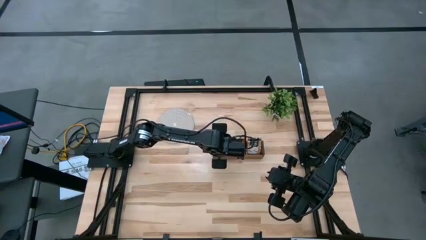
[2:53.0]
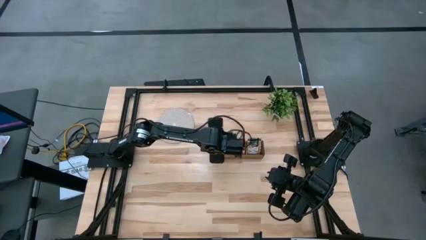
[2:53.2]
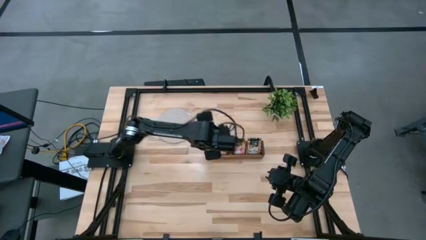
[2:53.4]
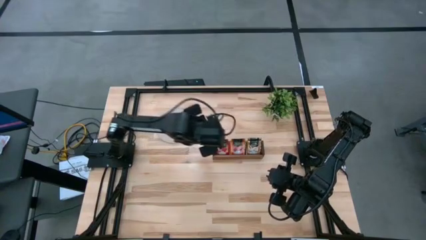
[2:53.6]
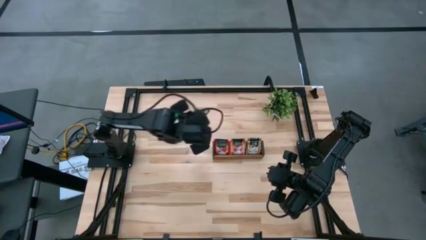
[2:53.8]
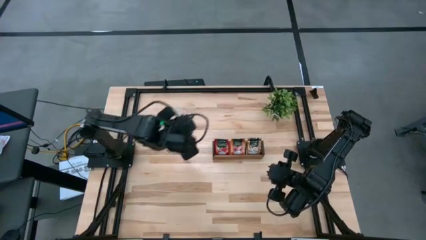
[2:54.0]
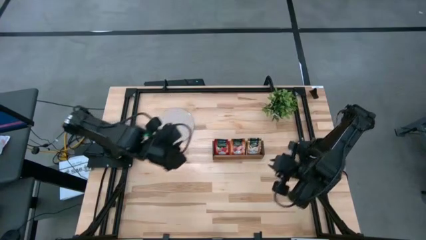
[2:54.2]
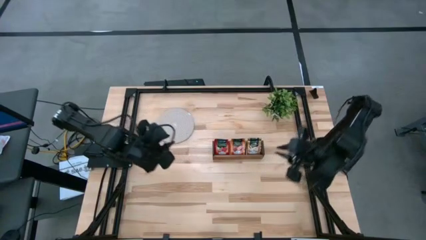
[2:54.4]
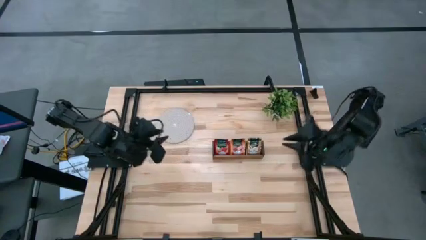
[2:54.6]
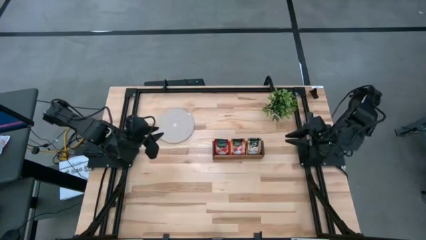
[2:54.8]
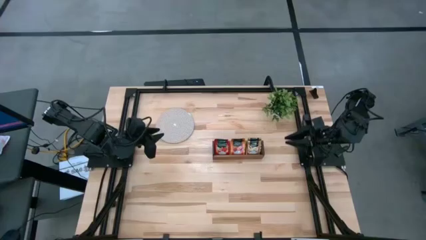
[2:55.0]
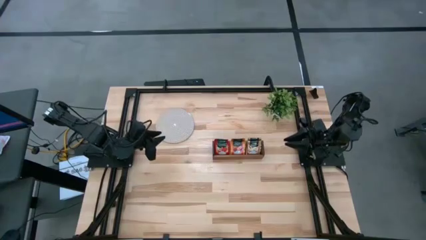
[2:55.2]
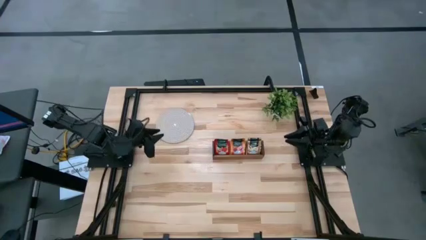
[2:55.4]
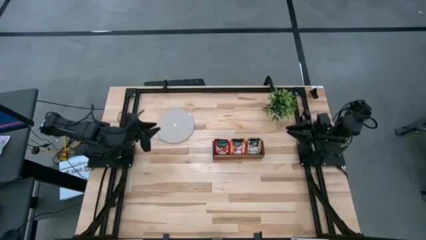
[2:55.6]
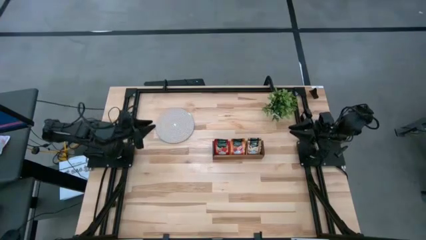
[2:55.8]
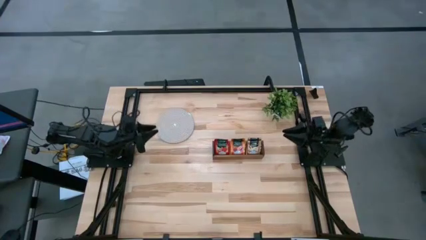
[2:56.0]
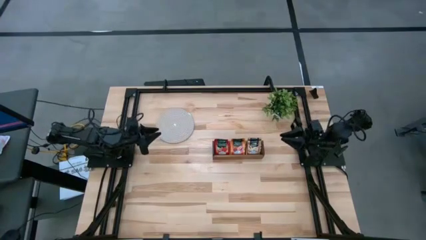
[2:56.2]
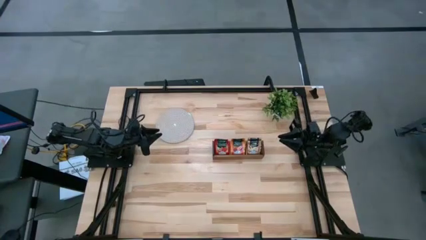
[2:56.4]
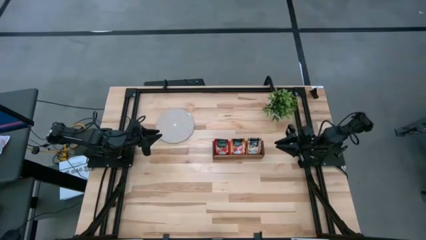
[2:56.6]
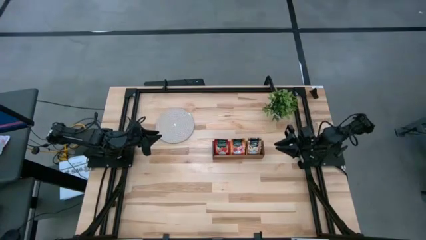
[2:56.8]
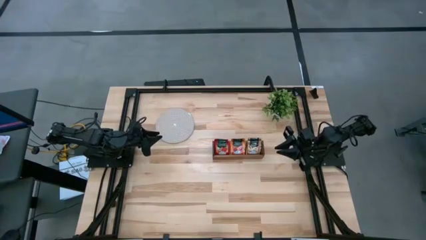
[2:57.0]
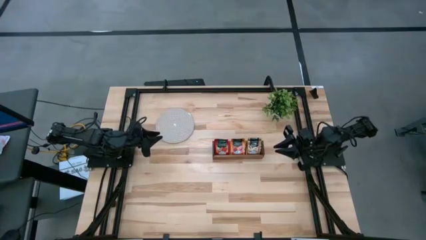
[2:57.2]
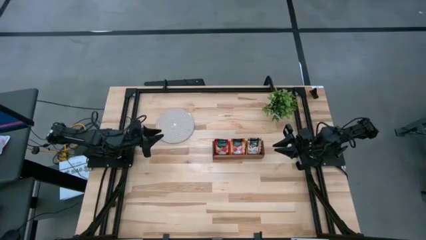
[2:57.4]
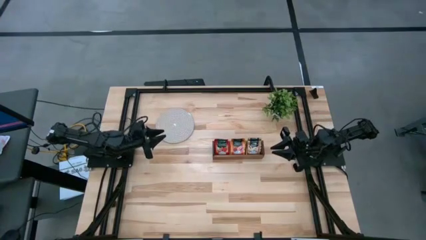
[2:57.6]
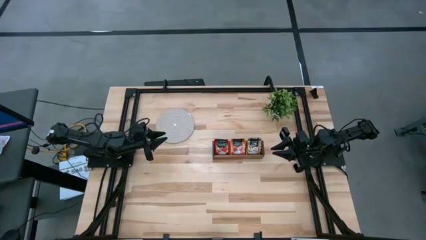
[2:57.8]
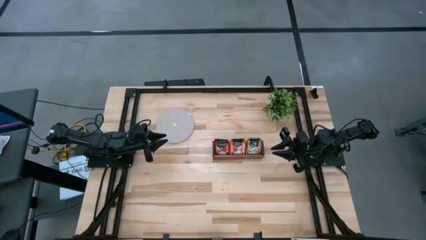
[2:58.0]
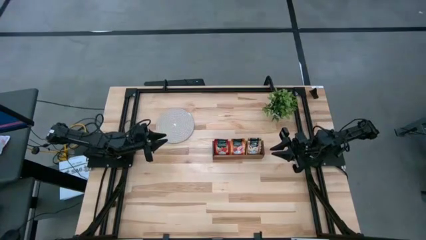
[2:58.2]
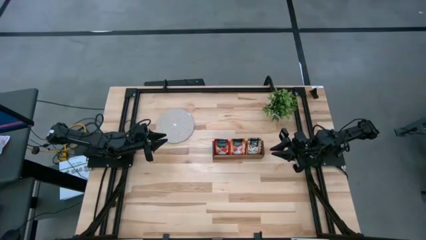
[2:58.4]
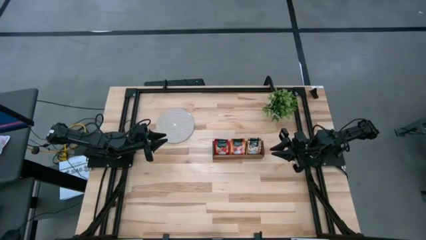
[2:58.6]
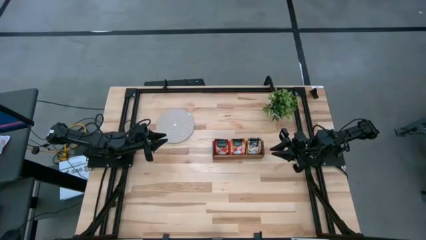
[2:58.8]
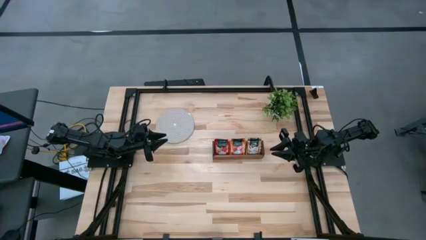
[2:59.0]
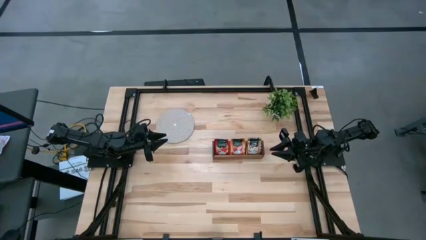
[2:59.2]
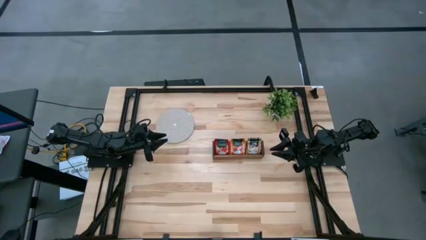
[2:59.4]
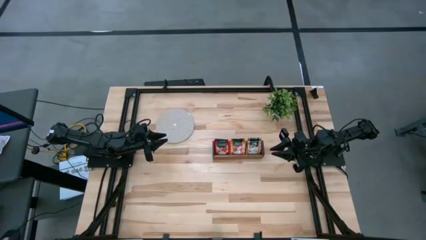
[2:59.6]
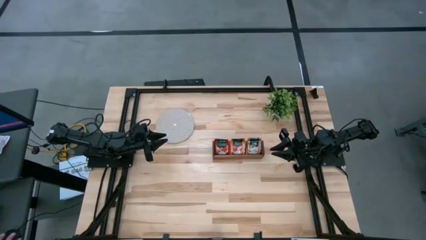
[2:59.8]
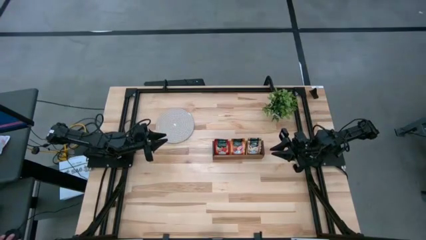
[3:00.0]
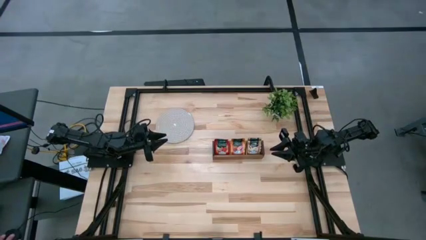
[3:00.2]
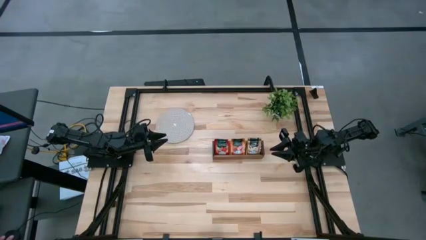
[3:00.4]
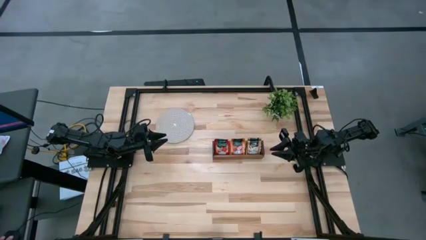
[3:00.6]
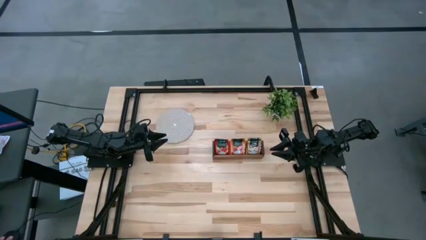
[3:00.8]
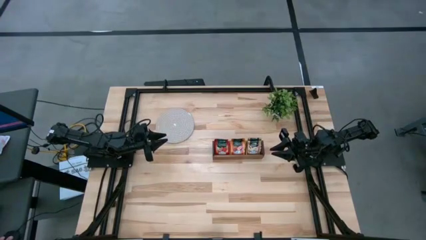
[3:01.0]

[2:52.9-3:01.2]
Task: Pick & Place Tea
Return to Home Position

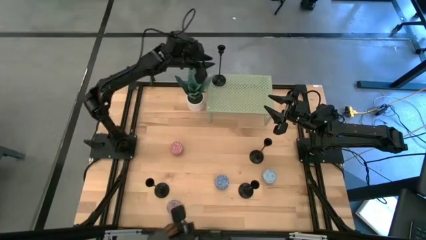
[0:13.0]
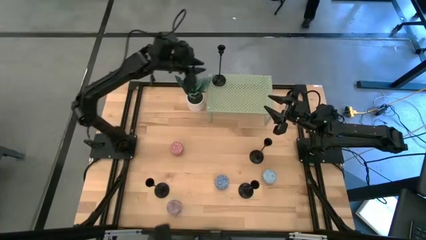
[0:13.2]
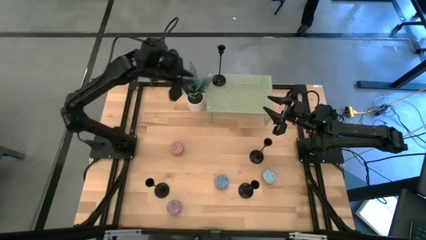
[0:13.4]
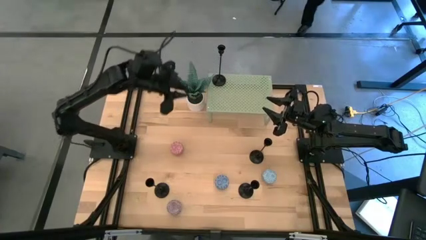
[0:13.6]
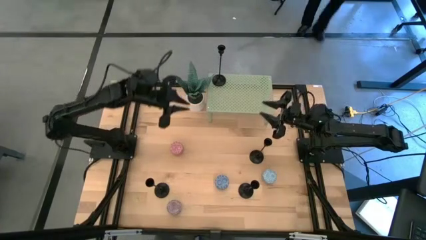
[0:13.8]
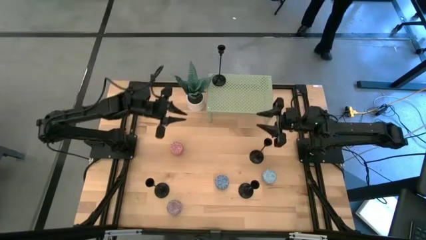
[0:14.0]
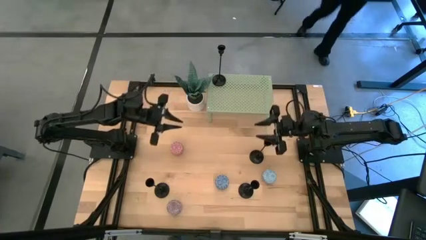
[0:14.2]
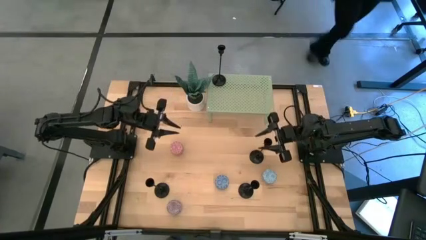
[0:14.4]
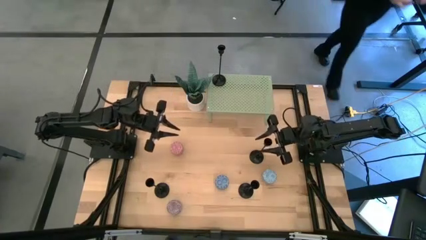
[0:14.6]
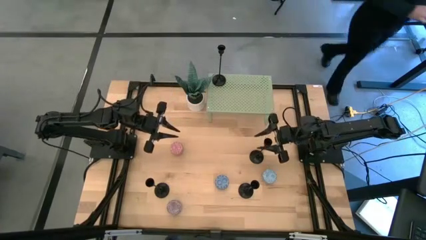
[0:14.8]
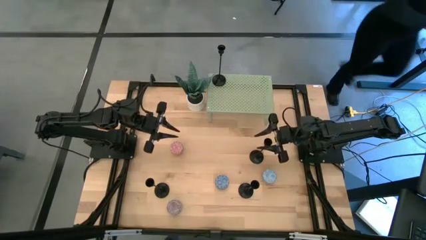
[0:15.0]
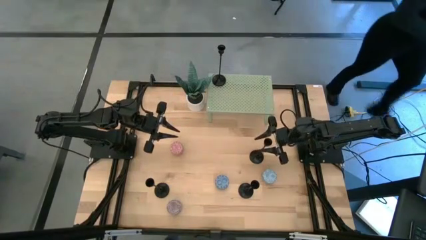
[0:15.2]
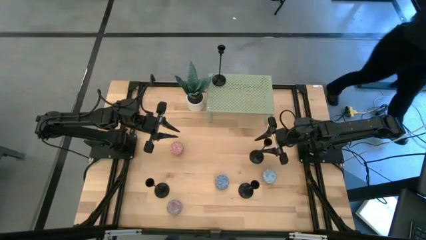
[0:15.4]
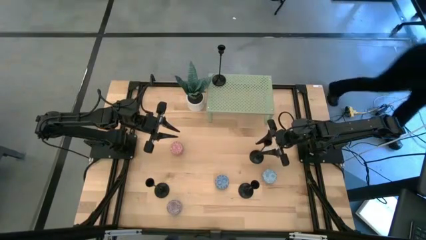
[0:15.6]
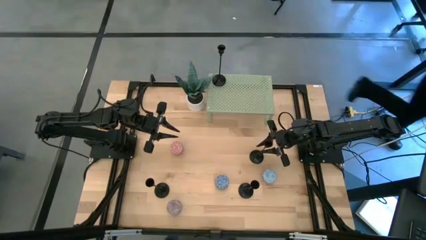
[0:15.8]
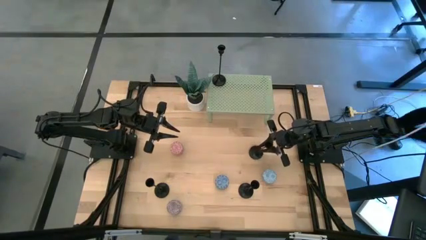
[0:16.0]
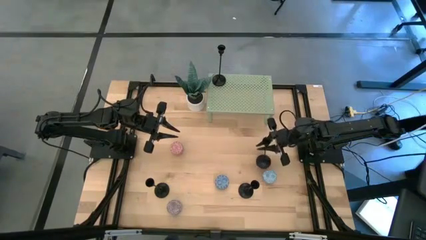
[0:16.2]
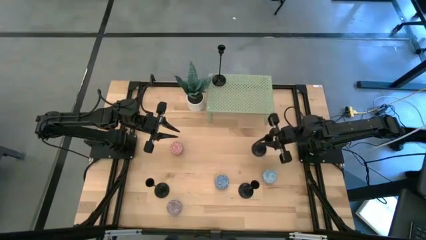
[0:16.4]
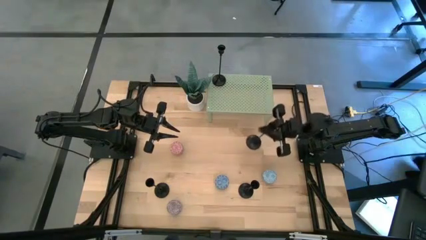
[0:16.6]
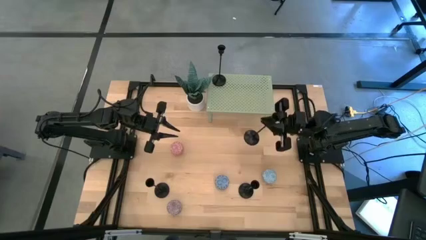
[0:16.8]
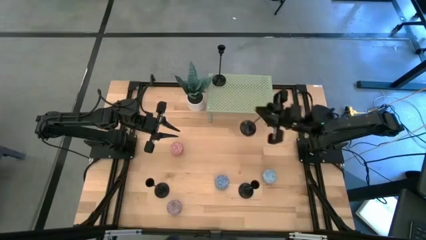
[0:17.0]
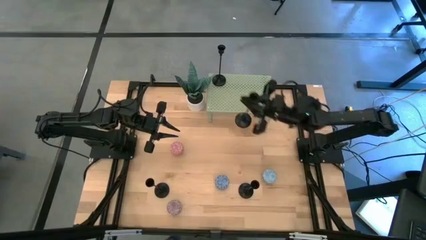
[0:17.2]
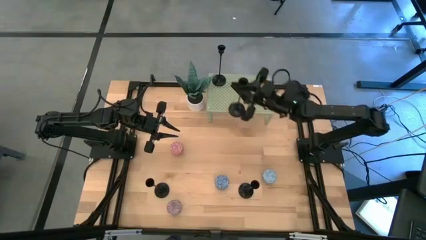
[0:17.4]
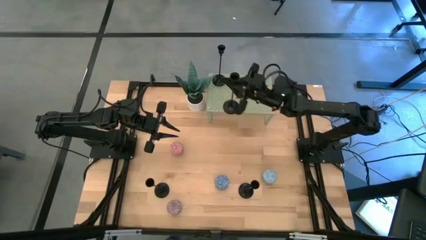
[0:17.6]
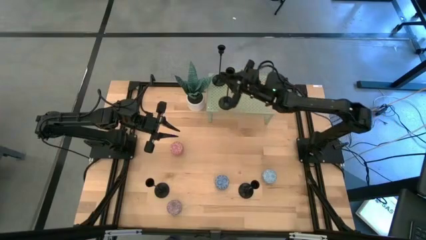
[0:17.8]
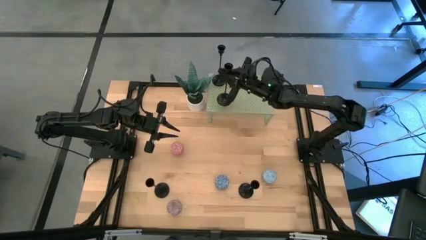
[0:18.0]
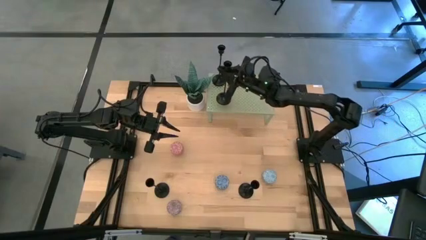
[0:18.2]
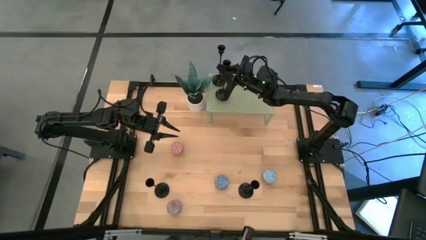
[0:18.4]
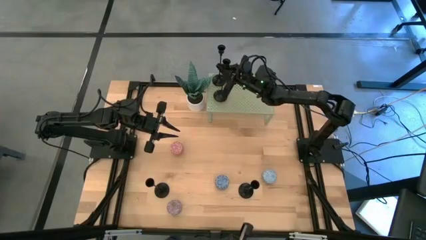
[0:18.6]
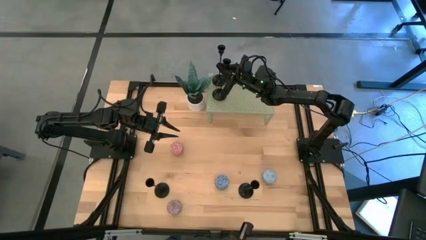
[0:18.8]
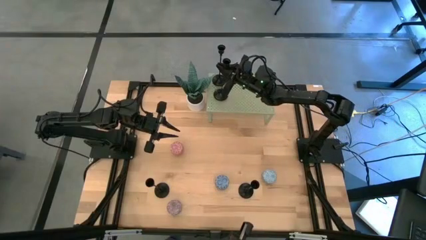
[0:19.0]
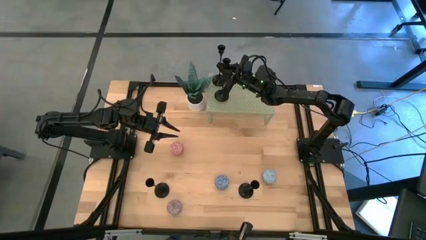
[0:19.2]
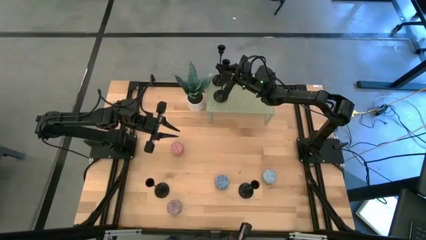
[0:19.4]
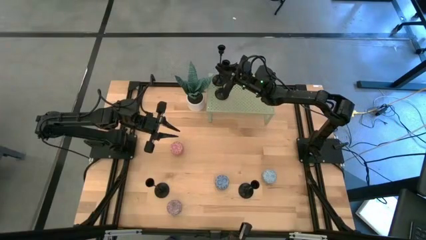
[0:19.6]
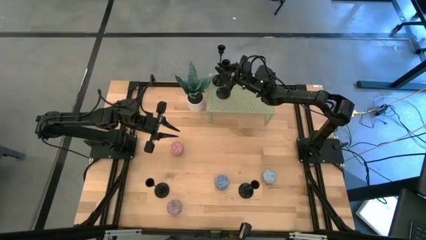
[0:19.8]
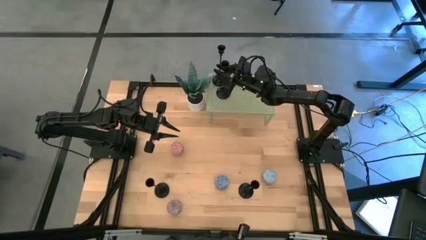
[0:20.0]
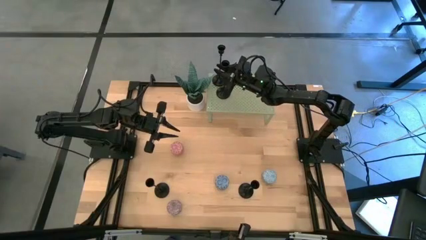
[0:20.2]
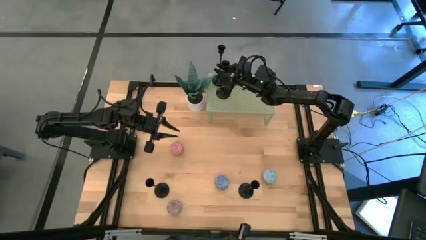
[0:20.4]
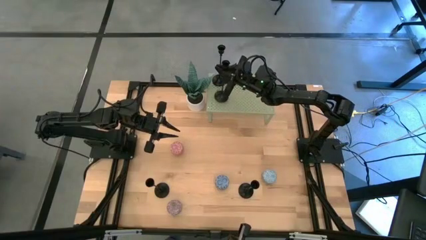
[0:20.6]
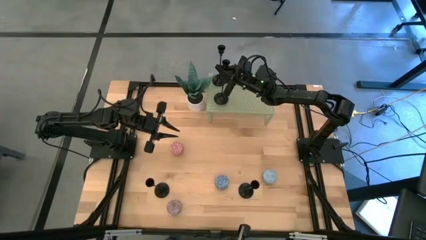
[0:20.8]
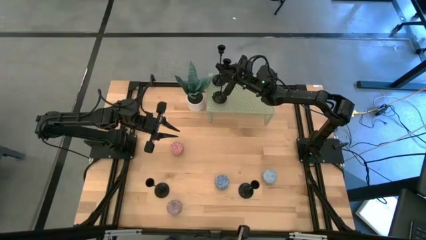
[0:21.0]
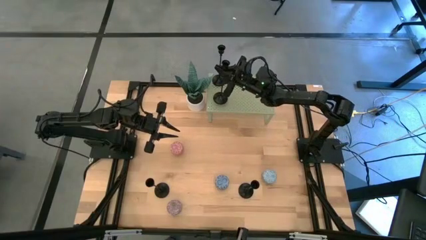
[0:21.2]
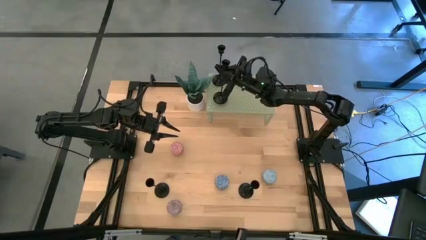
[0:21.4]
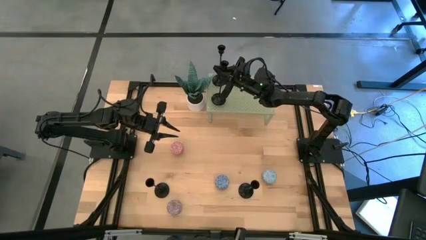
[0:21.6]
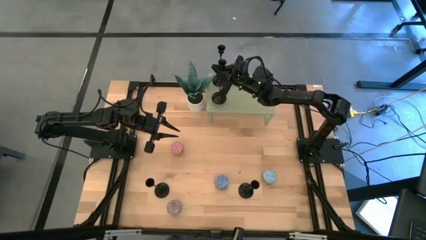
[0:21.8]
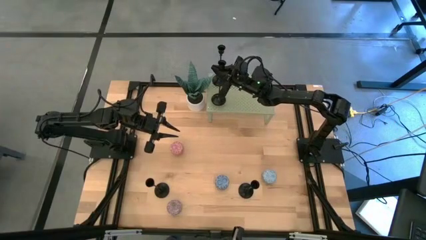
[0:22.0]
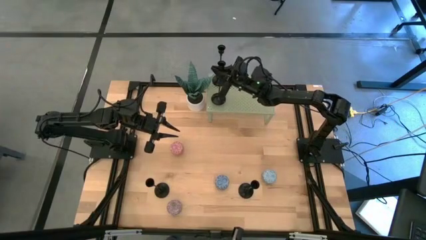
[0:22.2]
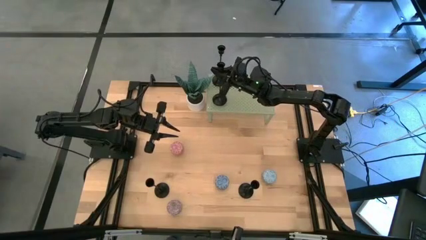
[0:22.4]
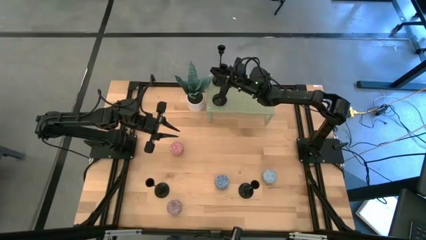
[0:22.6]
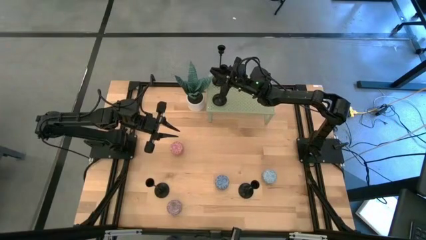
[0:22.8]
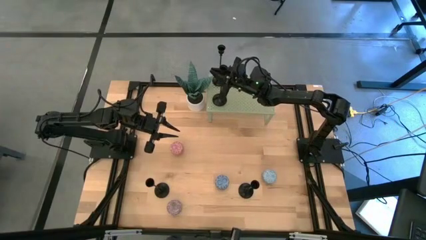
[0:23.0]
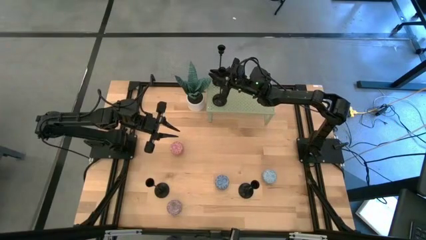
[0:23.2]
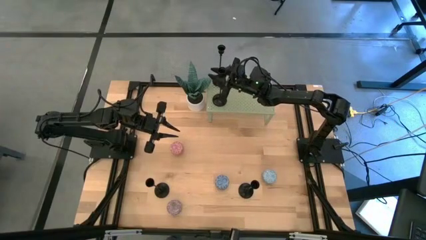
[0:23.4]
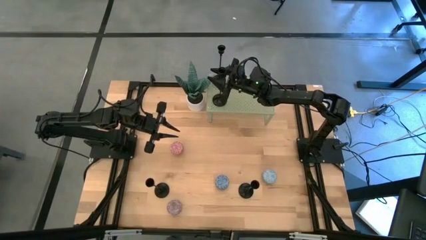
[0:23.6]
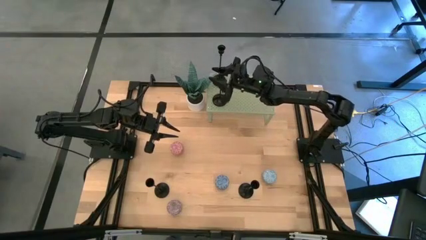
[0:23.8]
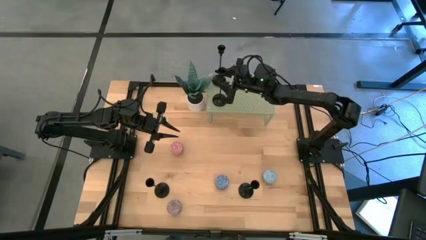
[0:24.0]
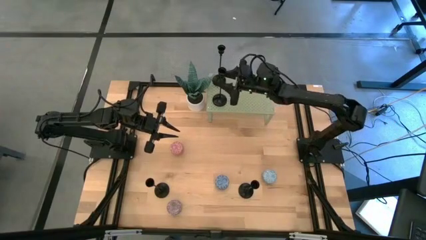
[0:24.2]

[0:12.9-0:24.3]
Task: Pick & Place candle stick holders
Align the black candle holder with the other black candle holder on the shelf
